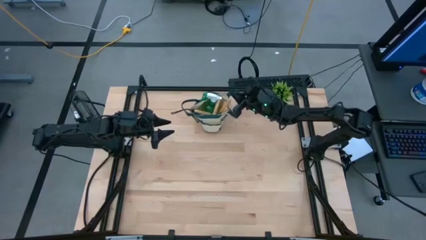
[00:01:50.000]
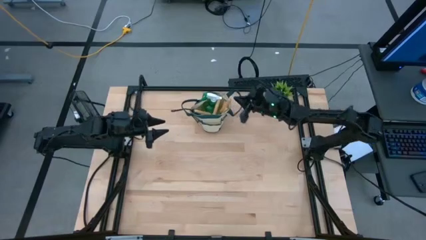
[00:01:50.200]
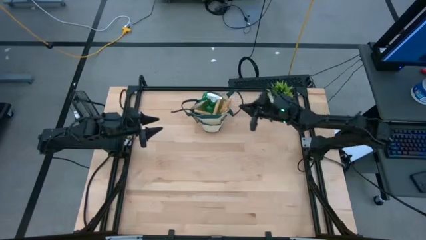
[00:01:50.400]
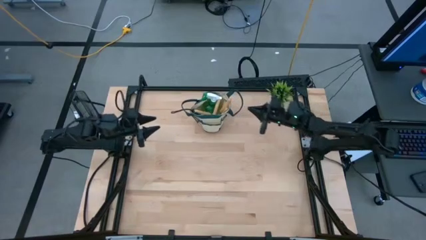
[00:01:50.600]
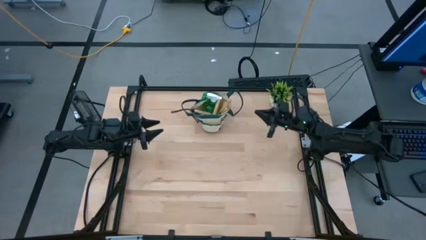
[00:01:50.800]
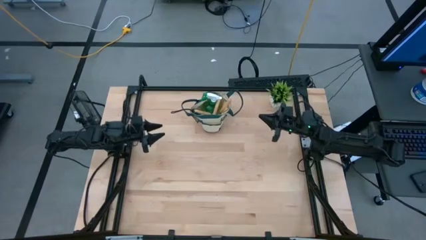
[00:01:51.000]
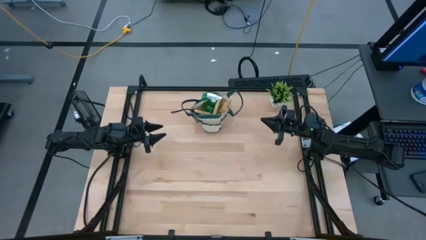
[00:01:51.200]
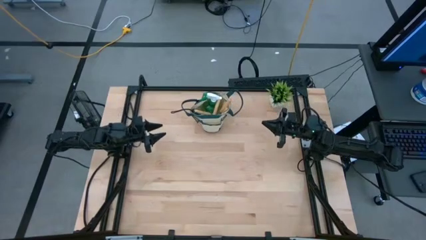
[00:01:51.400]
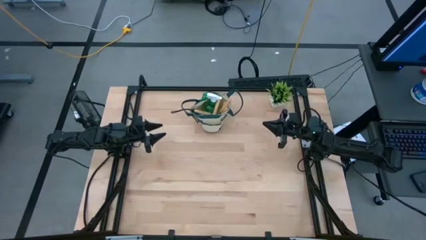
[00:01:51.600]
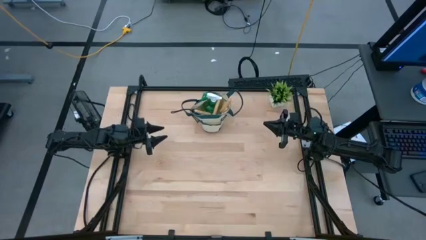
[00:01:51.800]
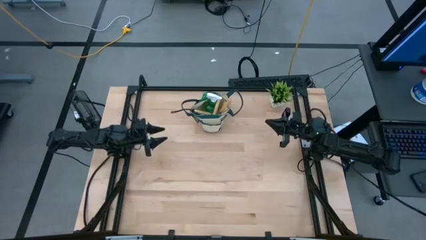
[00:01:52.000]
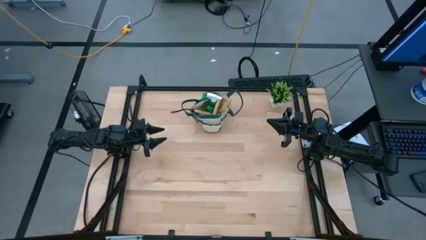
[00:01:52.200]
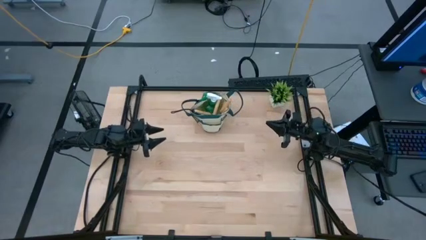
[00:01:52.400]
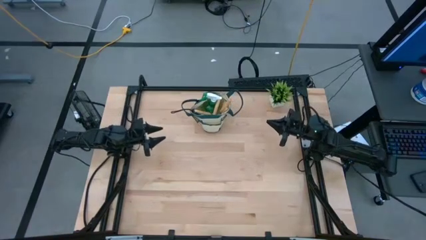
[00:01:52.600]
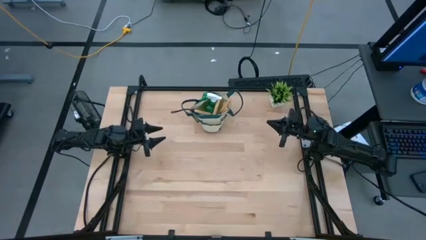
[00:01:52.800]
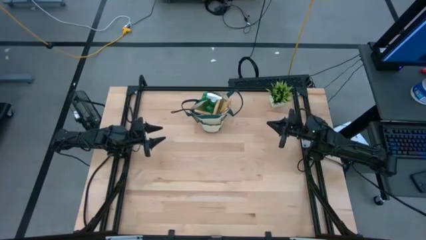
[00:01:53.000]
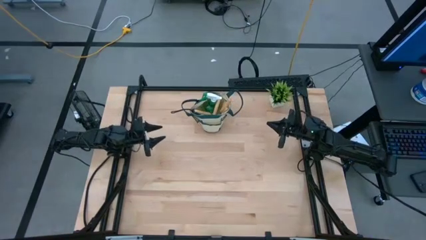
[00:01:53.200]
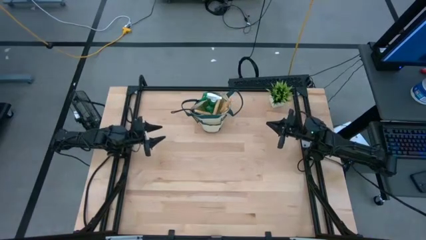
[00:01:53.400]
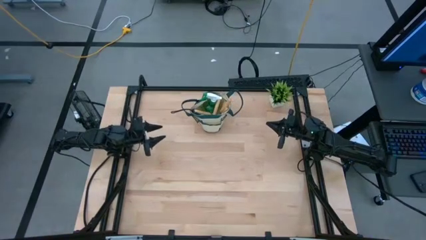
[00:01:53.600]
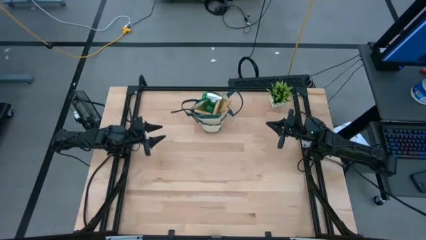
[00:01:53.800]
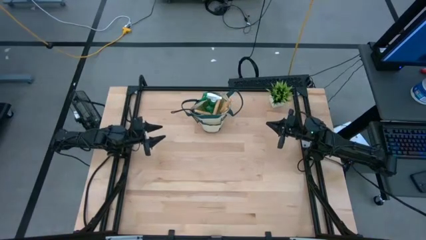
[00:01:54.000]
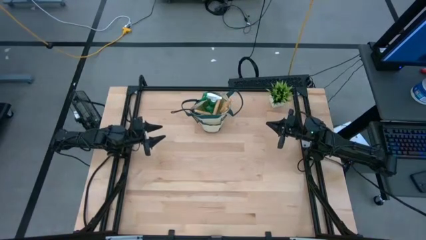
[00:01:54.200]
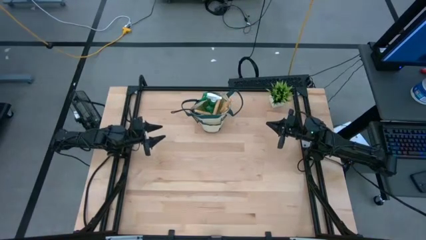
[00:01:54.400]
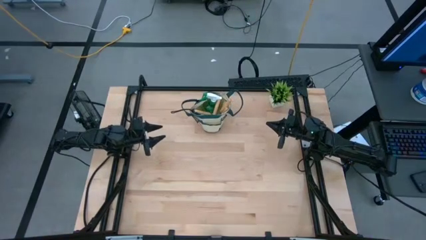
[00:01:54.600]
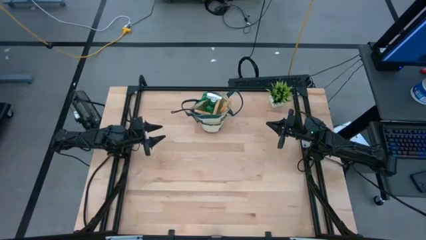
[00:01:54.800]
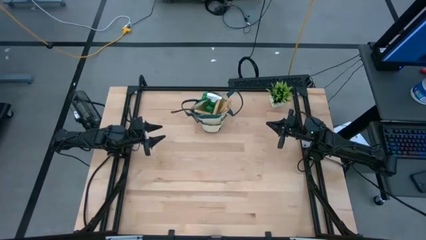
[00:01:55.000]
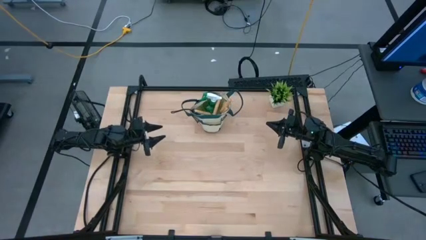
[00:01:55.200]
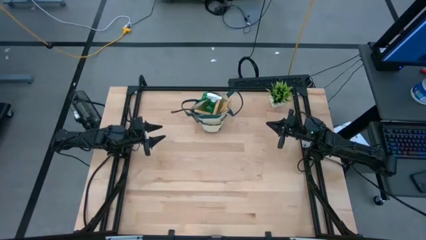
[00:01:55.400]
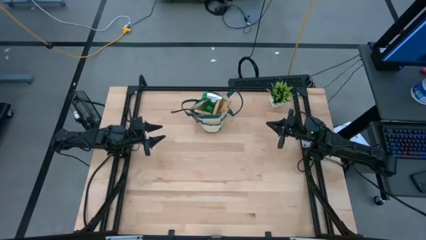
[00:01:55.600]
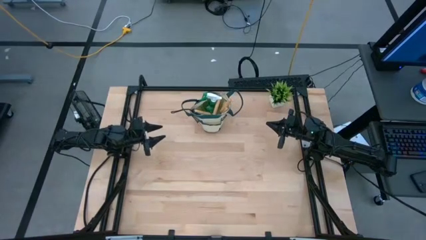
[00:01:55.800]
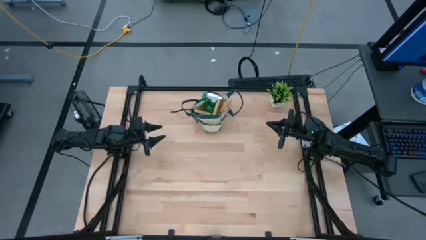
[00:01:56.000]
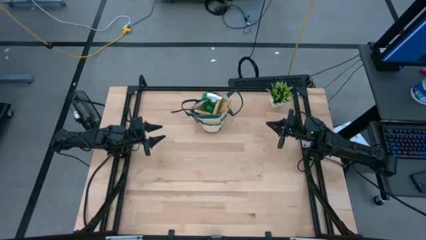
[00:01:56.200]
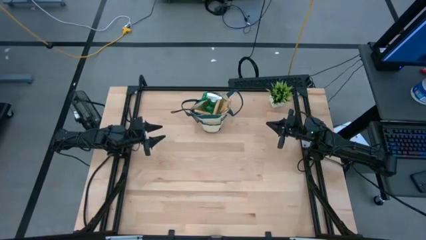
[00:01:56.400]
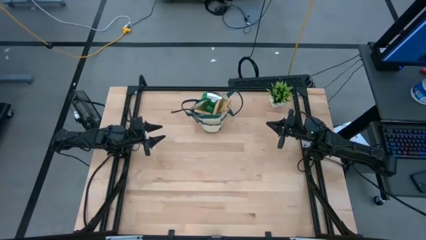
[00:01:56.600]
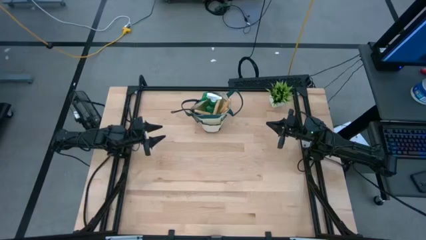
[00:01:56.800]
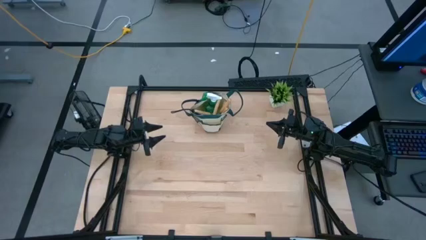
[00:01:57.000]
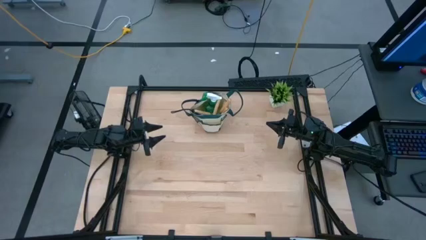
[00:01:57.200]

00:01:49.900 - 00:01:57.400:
Task: Pick & Place Garden tools in Gardening bag
Return to Home Position

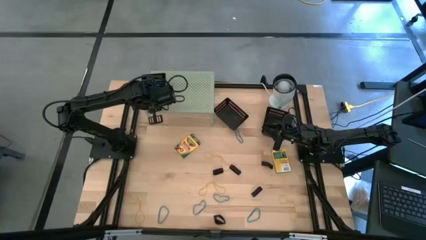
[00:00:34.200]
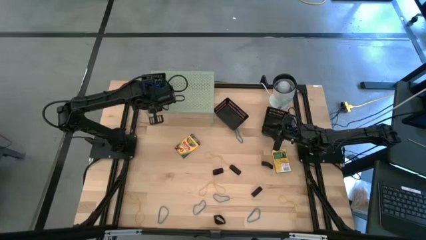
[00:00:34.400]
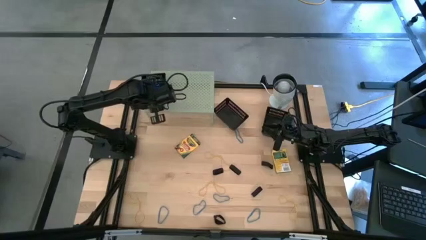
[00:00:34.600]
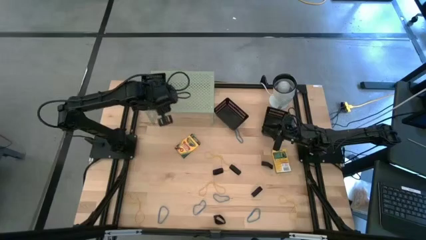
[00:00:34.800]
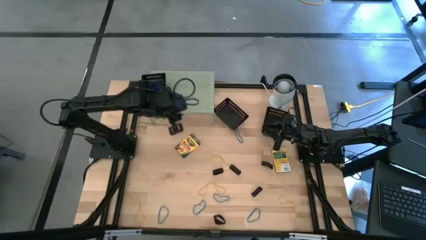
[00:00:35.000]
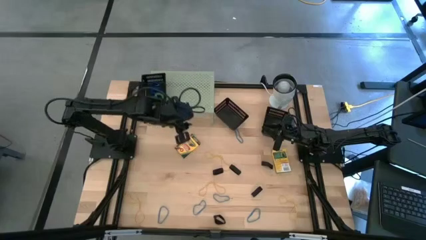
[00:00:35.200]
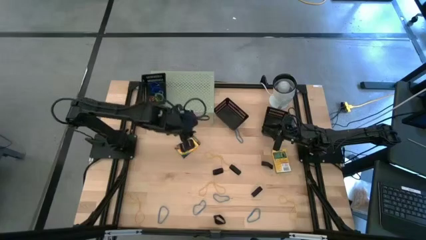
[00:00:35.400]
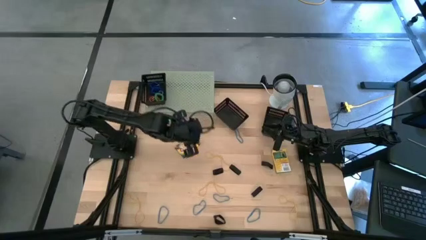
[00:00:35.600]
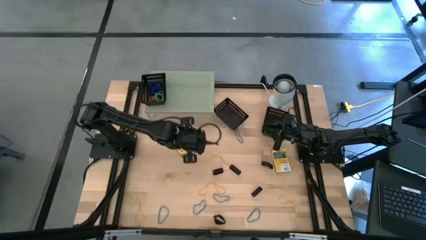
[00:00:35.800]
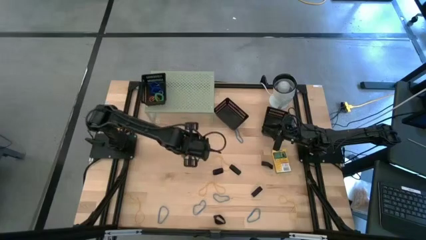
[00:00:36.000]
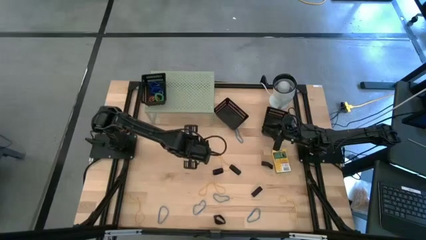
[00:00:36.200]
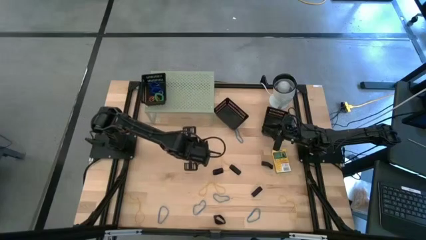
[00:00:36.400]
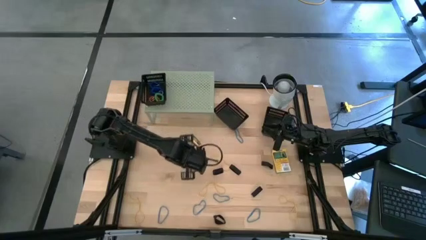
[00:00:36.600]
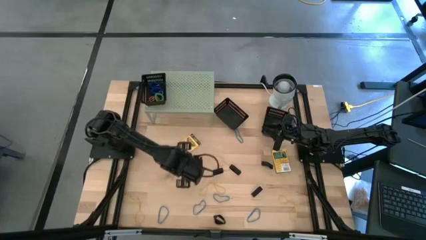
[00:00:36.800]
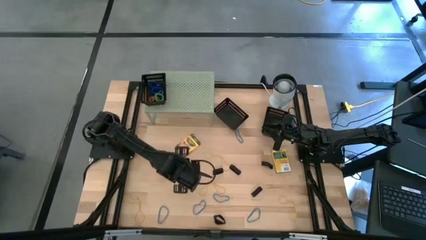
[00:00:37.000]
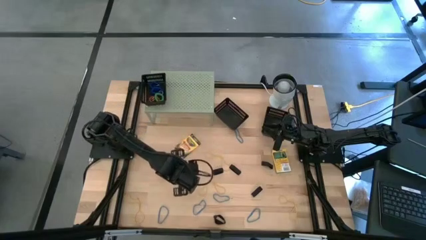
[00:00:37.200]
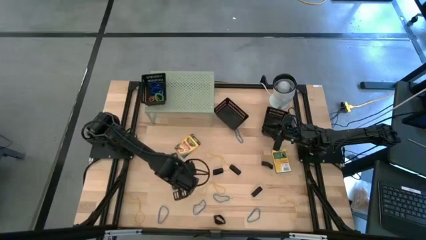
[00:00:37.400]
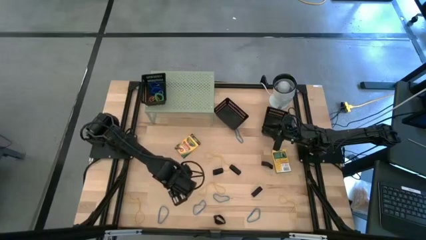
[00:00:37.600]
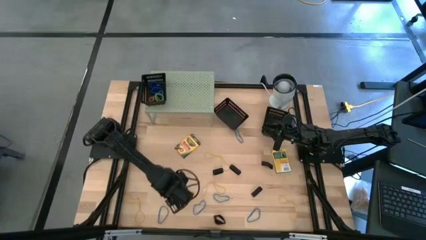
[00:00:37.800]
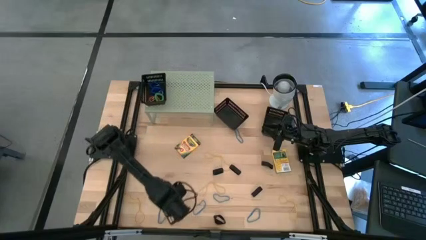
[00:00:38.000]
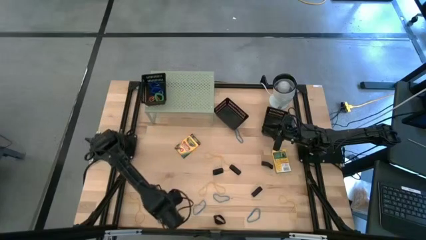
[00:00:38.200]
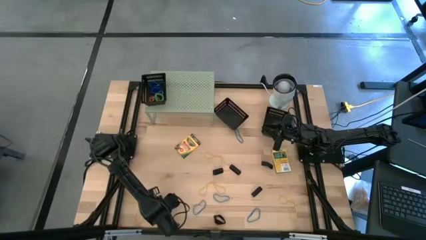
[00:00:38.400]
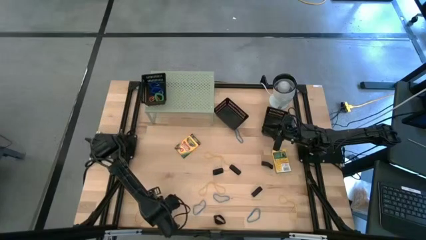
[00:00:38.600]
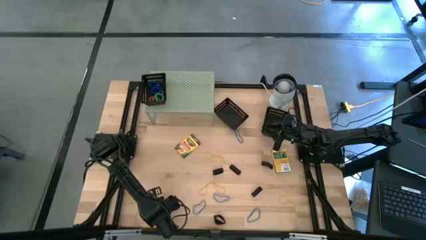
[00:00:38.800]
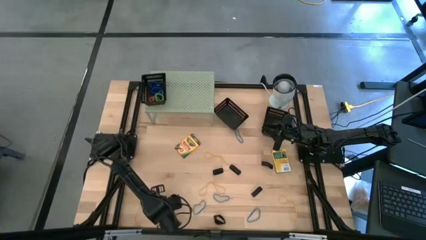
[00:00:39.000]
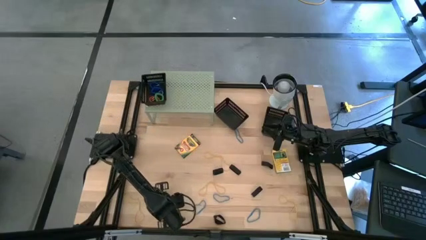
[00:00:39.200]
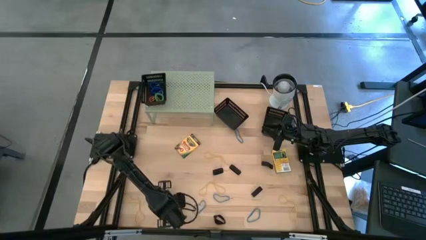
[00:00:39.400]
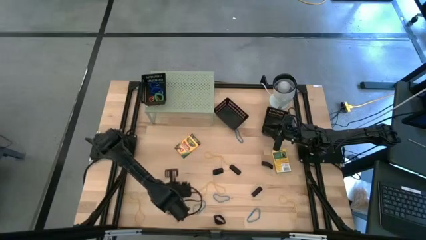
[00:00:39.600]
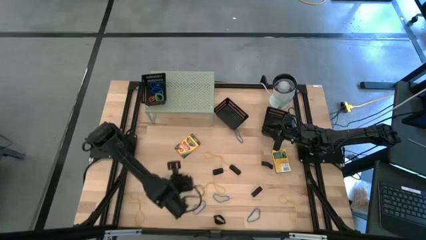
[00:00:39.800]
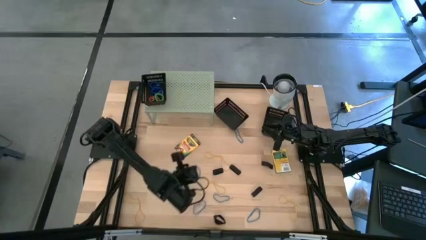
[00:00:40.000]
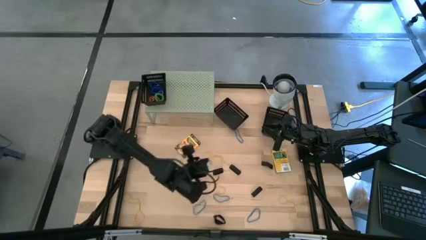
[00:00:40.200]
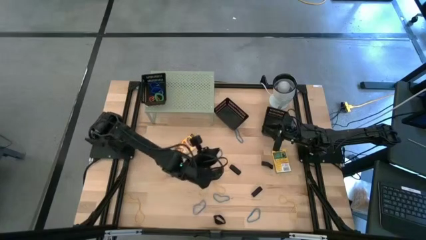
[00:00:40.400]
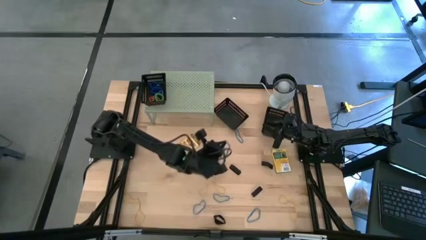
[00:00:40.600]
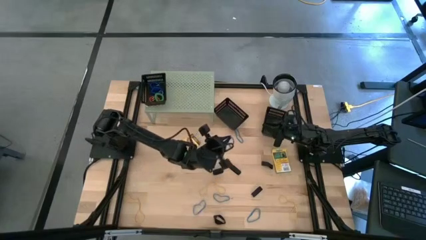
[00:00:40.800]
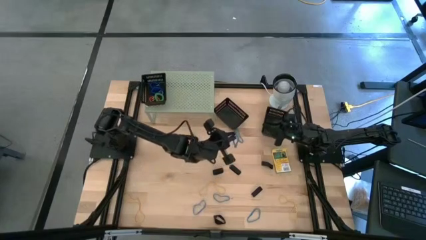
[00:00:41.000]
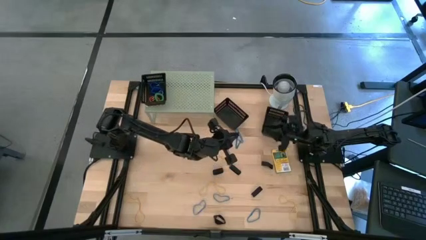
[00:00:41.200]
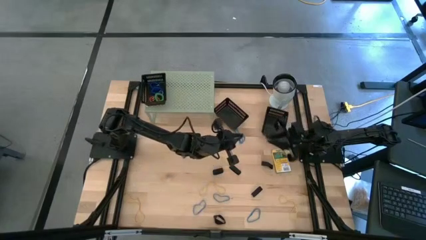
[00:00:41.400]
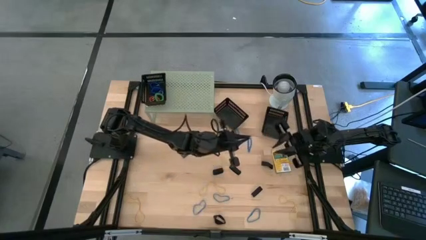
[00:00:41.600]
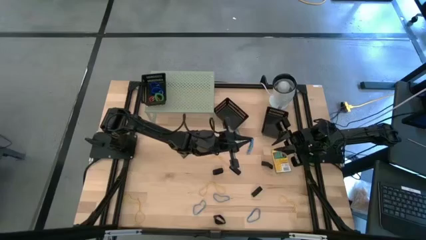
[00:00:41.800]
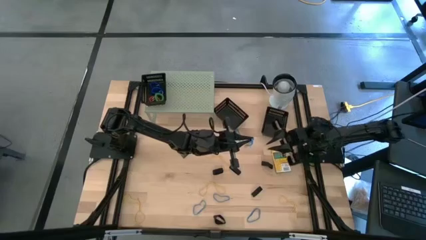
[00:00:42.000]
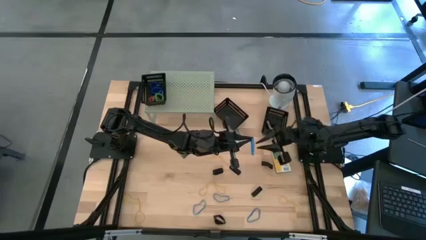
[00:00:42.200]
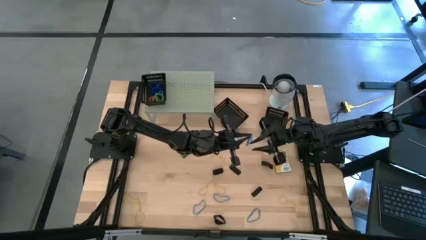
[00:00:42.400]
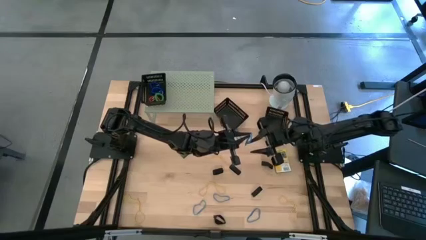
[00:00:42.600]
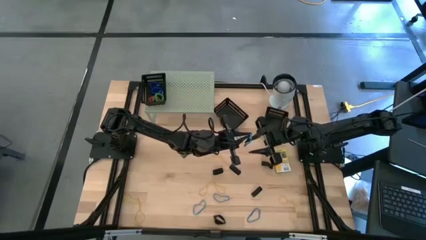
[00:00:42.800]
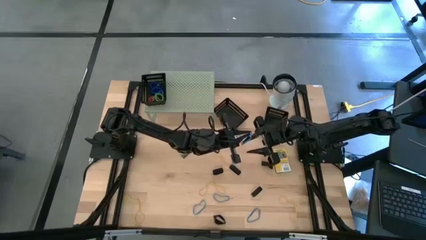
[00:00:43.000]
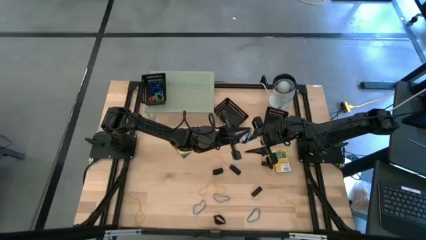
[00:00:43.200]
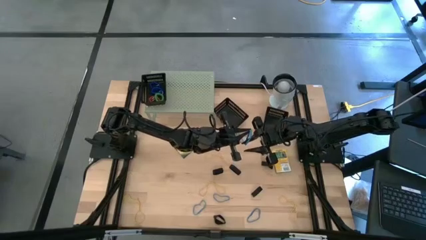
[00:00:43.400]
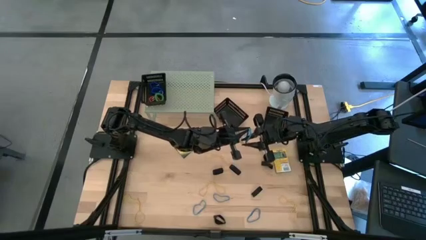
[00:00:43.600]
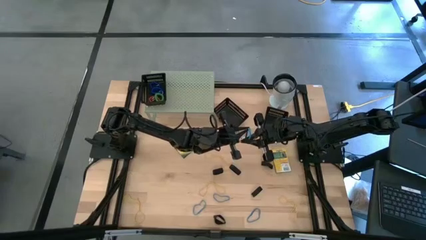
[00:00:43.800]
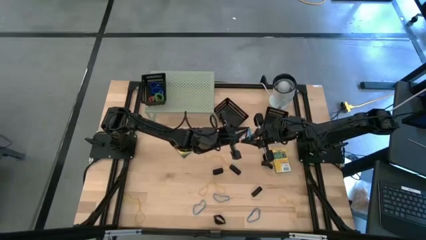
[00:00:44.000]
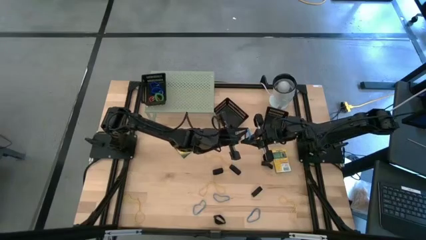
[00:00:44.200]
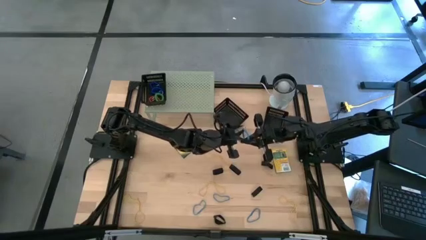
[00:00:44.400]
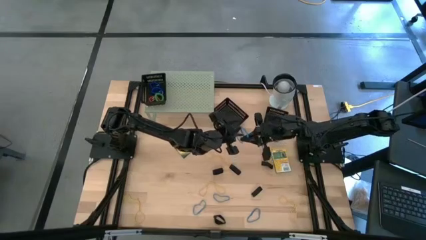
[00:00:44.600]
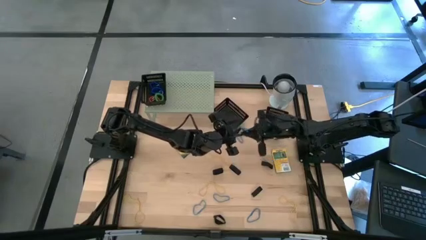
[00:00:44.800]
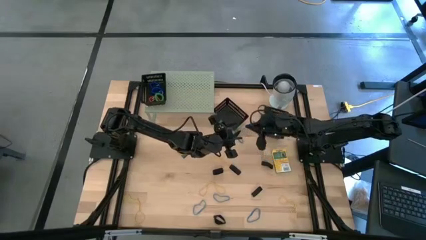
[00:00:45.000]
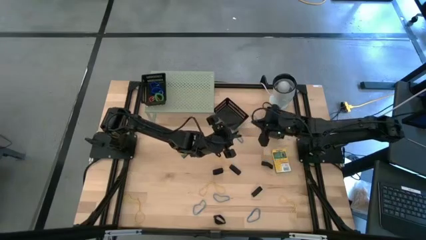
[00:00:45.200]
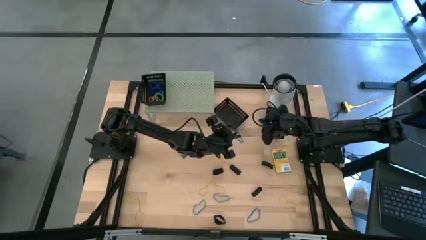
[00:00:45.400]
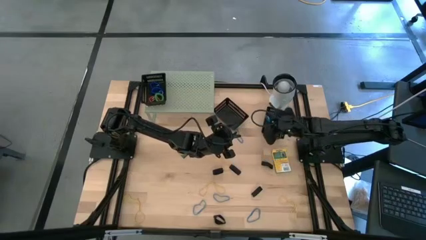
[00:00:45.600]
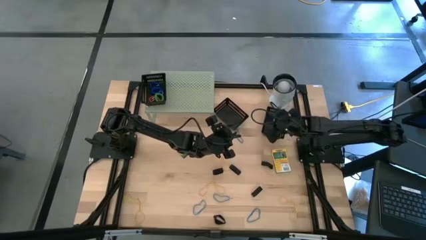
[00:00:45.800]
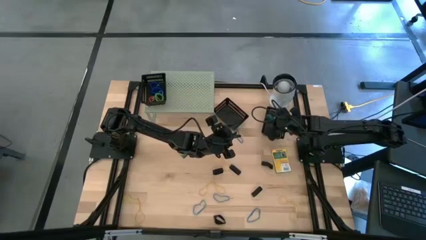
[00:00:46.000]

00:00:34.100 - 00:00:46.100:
Task: Pick & Place Office Desk Supplies
Put the blue rubber band into the right black bin
